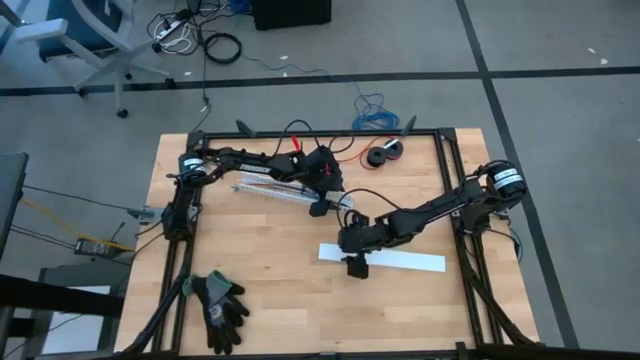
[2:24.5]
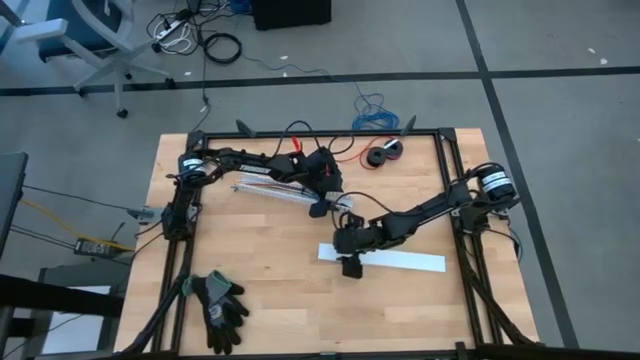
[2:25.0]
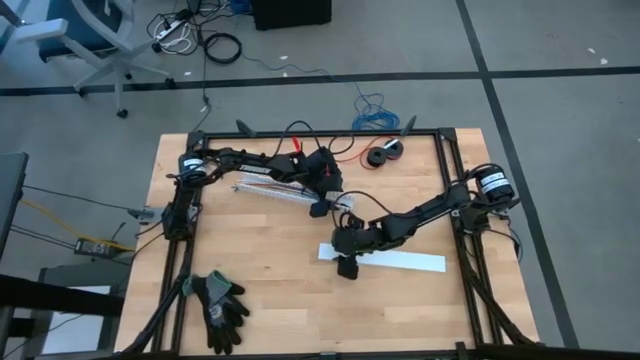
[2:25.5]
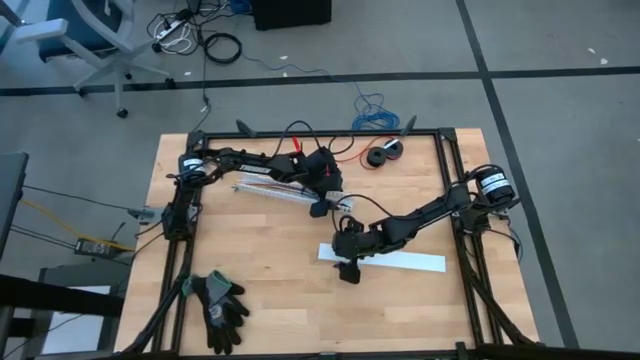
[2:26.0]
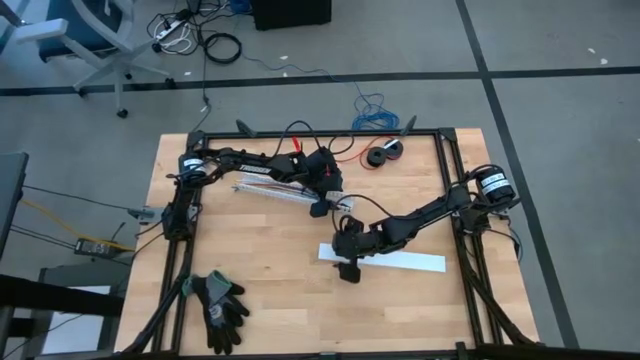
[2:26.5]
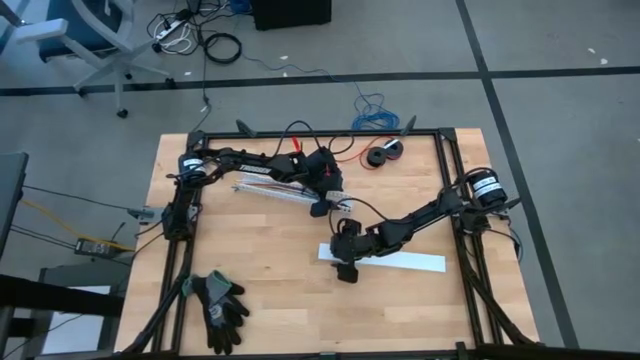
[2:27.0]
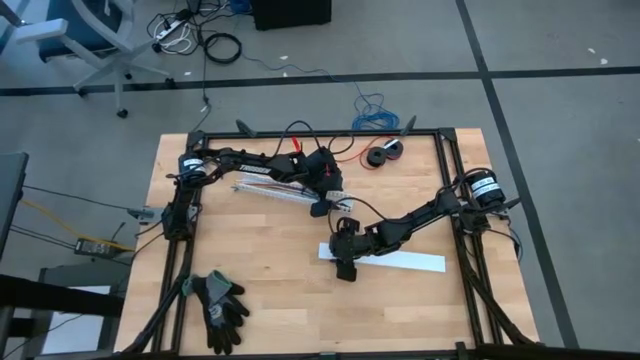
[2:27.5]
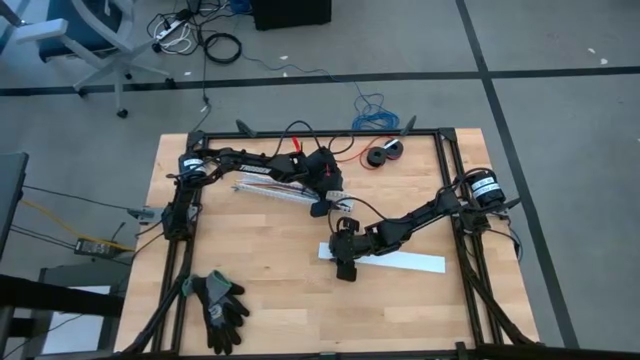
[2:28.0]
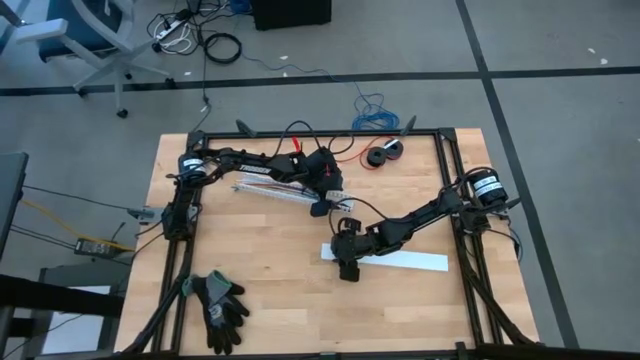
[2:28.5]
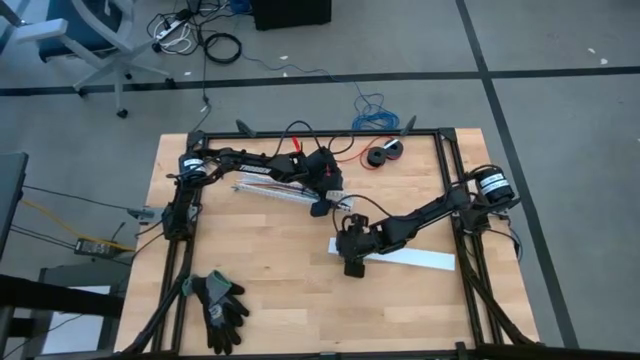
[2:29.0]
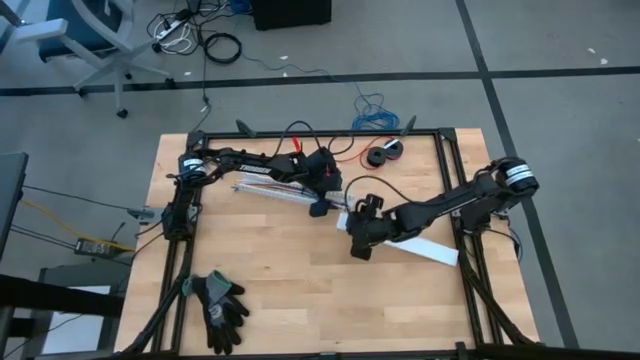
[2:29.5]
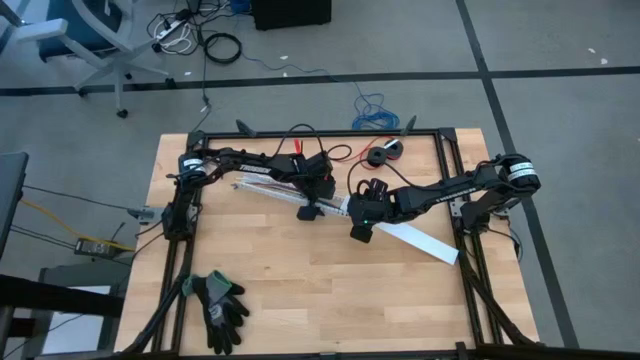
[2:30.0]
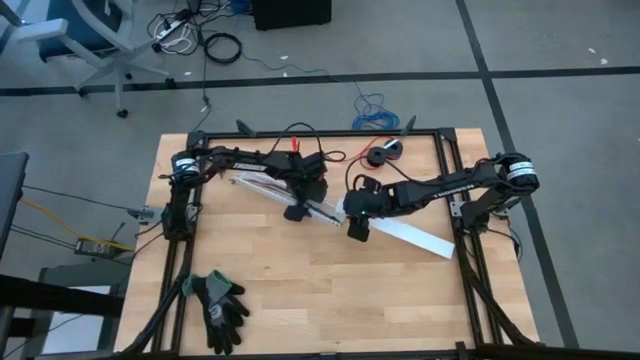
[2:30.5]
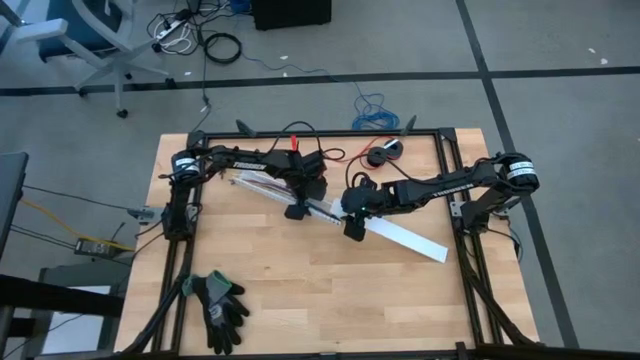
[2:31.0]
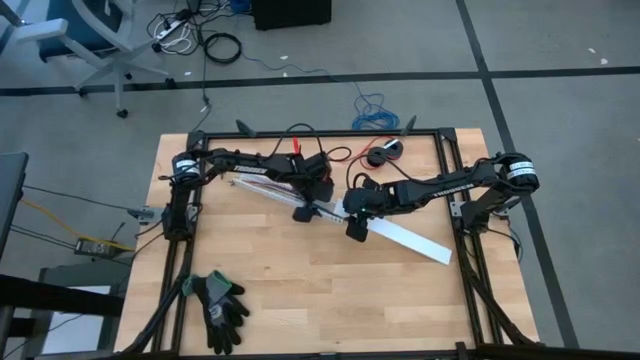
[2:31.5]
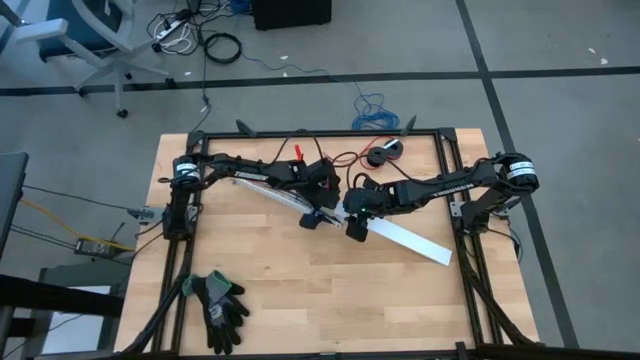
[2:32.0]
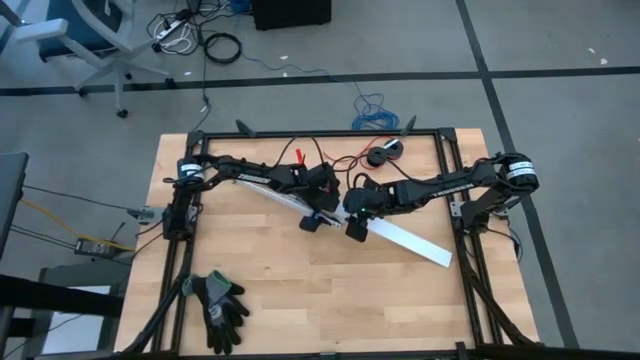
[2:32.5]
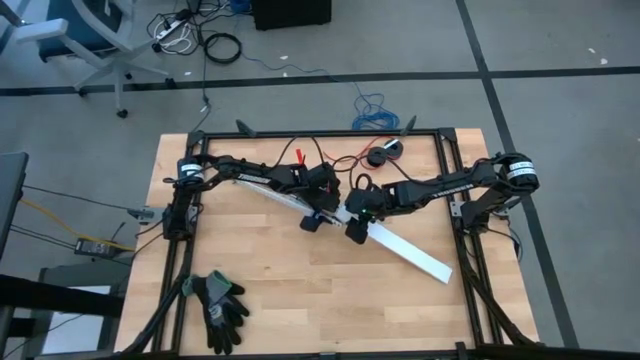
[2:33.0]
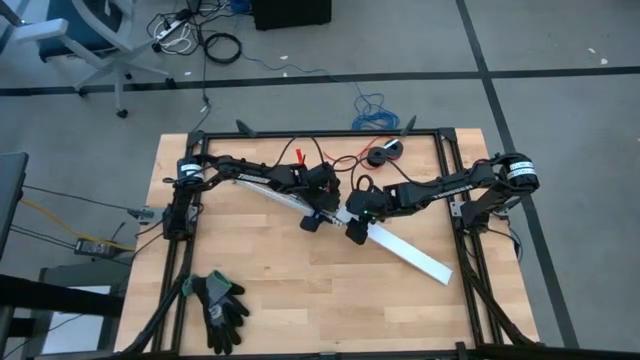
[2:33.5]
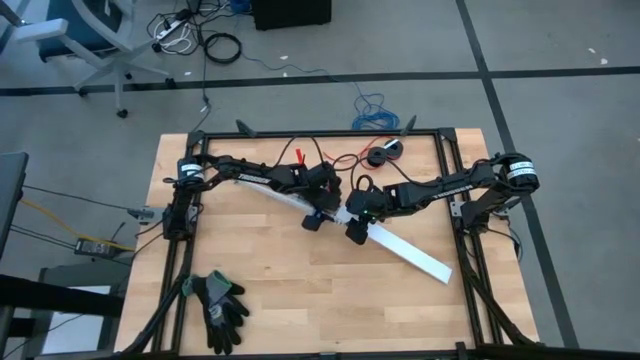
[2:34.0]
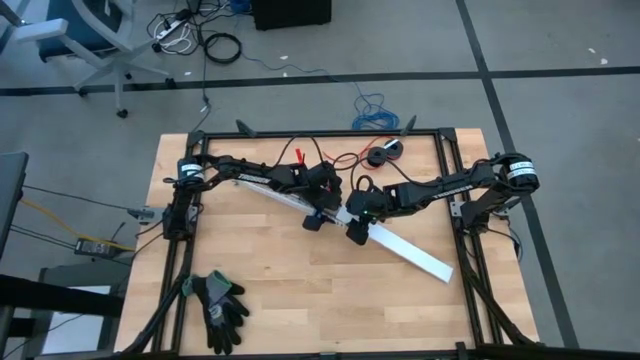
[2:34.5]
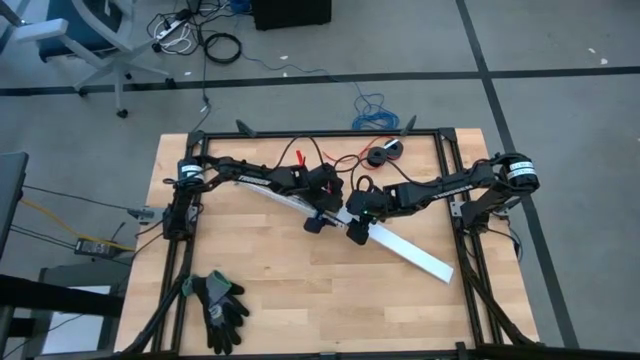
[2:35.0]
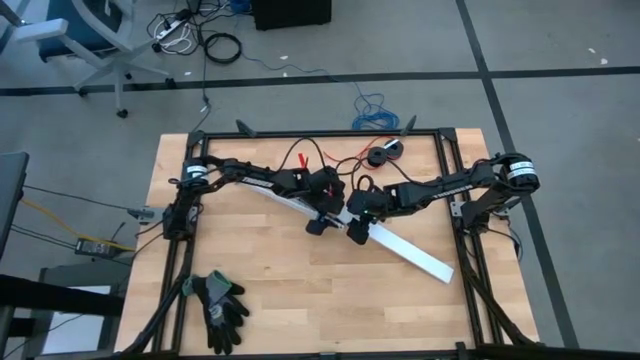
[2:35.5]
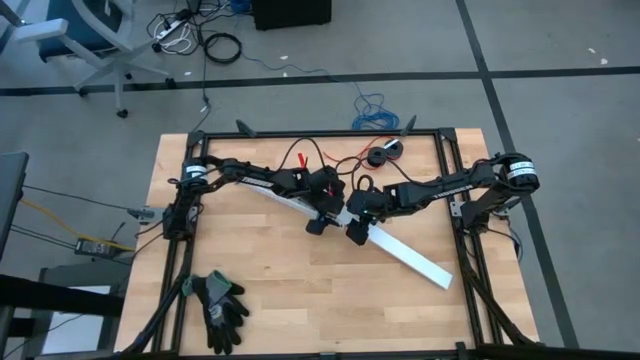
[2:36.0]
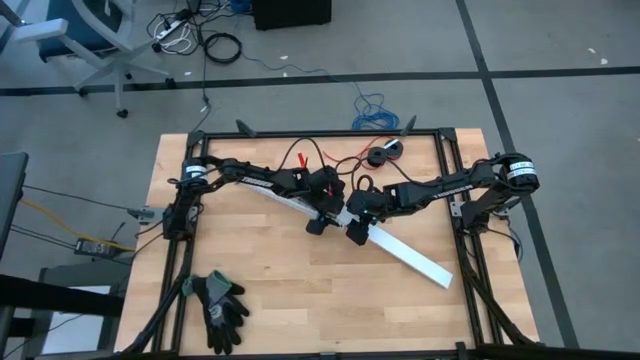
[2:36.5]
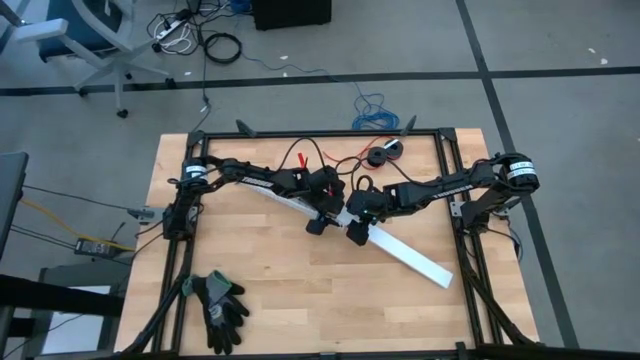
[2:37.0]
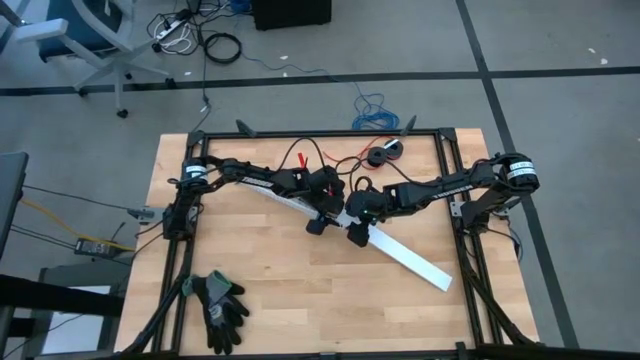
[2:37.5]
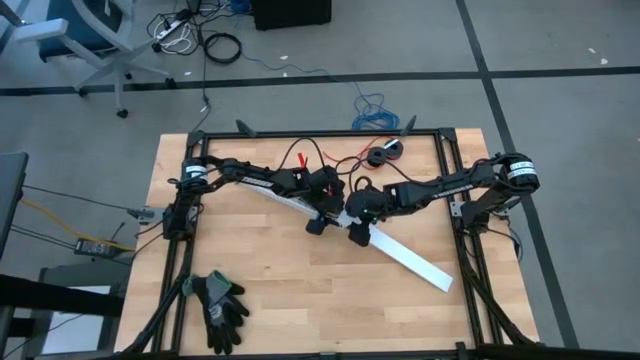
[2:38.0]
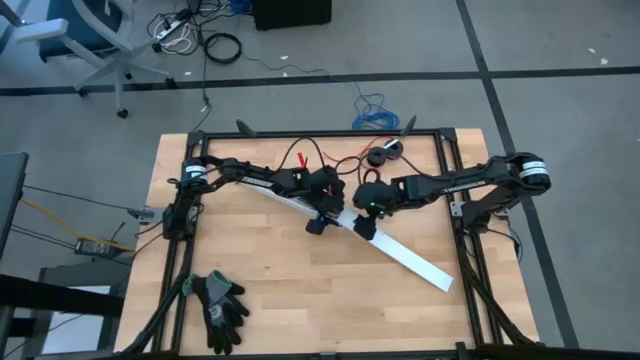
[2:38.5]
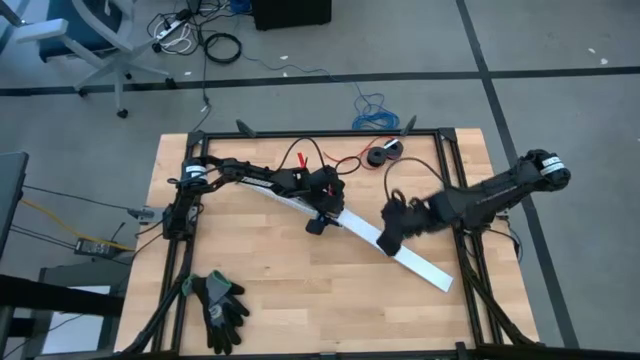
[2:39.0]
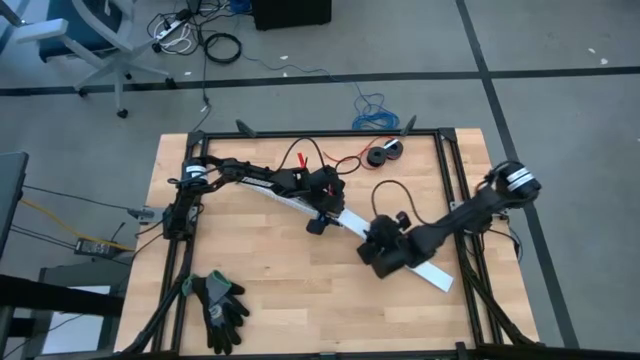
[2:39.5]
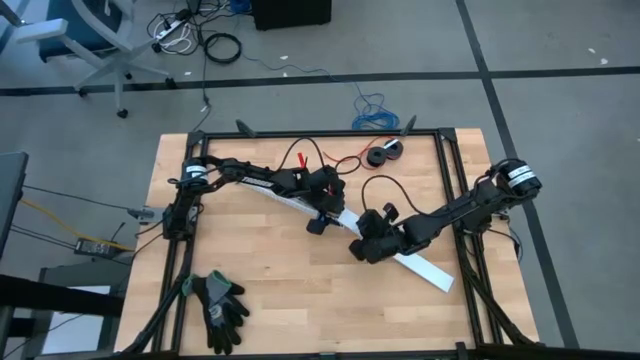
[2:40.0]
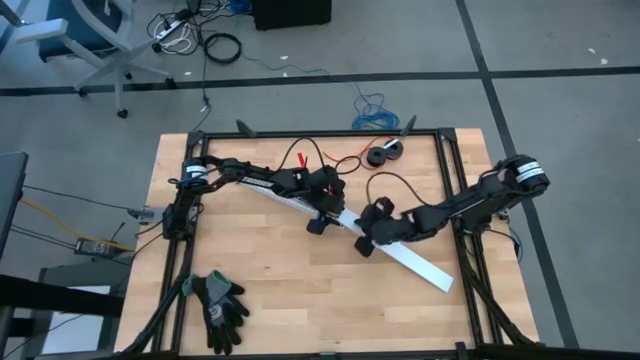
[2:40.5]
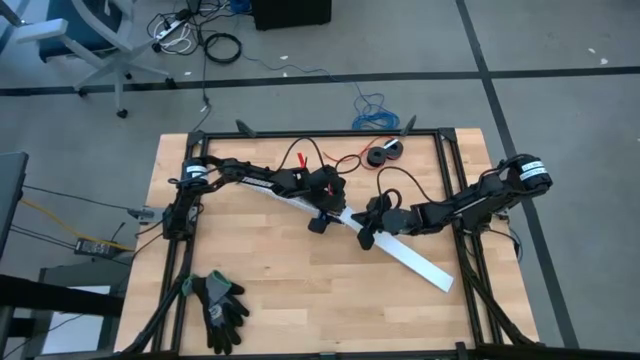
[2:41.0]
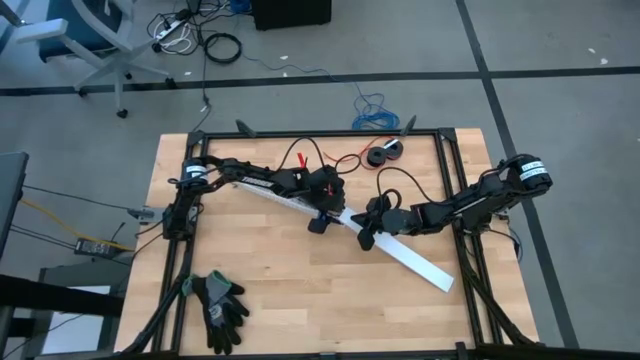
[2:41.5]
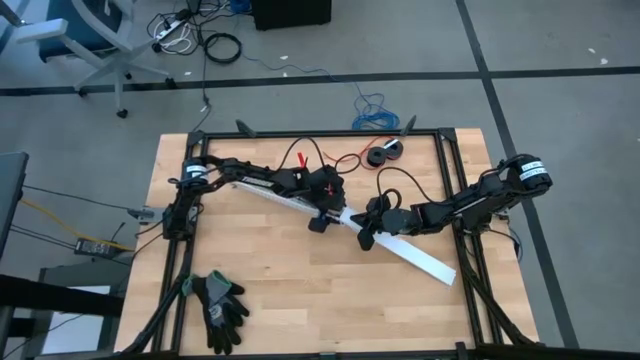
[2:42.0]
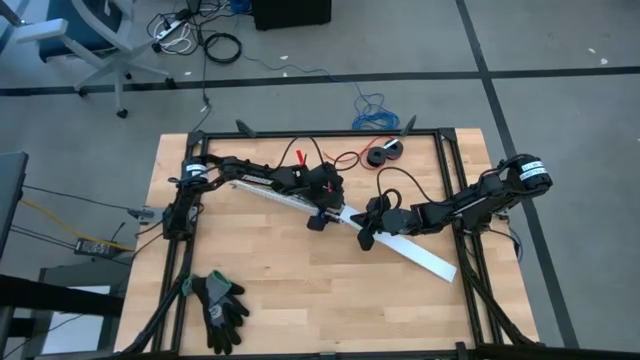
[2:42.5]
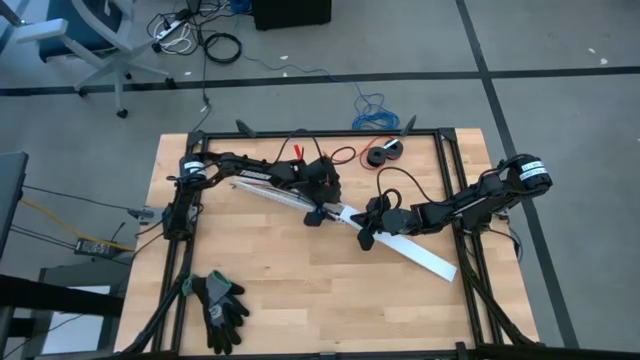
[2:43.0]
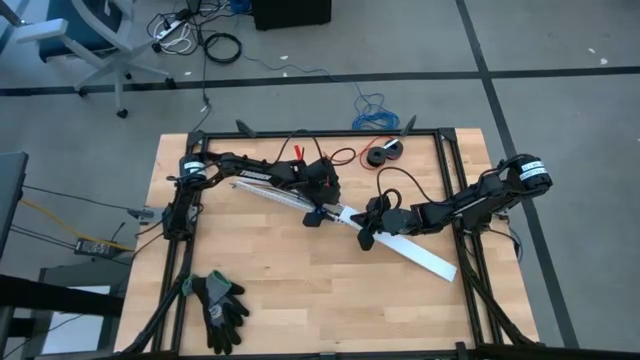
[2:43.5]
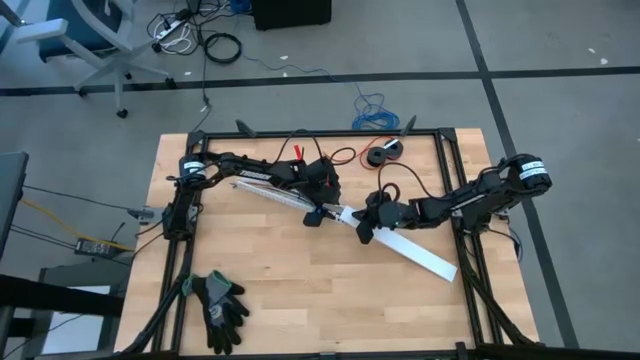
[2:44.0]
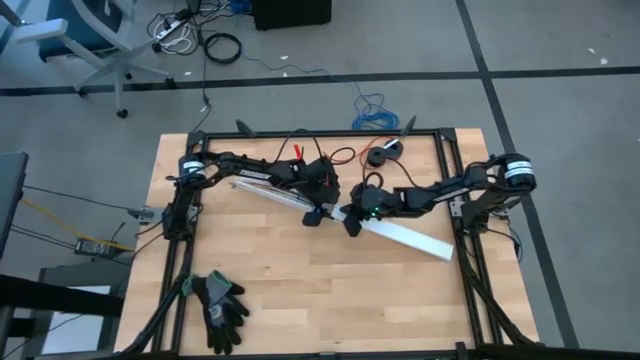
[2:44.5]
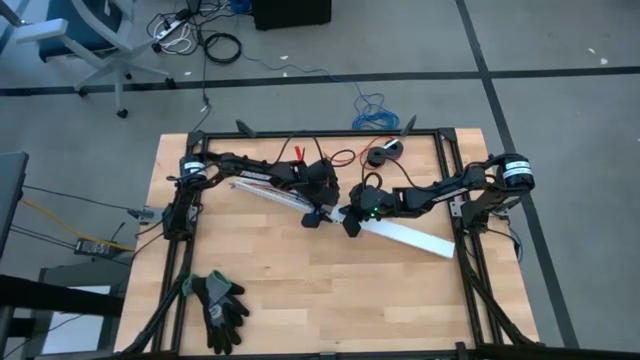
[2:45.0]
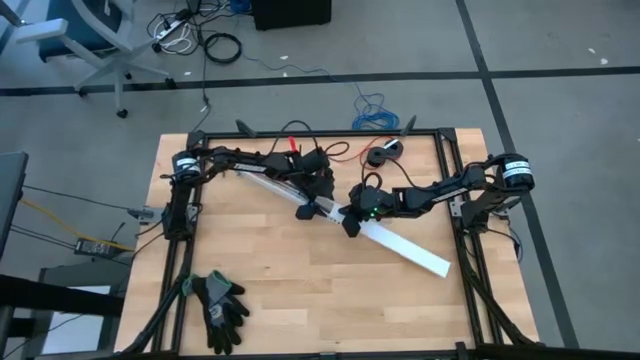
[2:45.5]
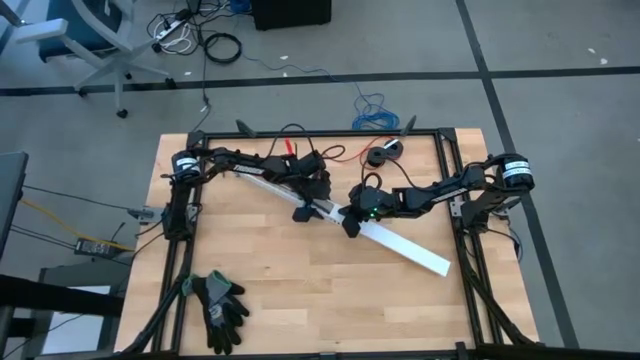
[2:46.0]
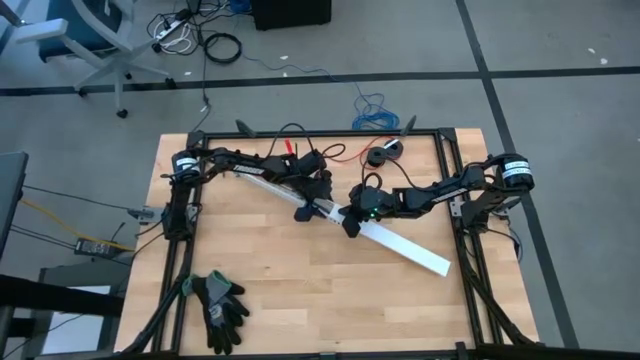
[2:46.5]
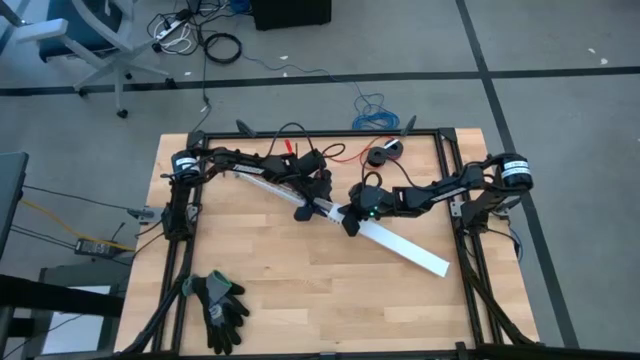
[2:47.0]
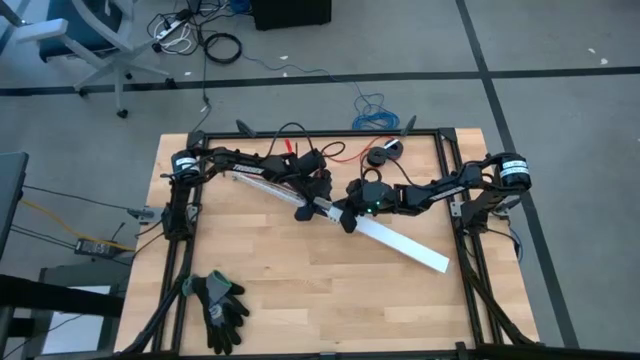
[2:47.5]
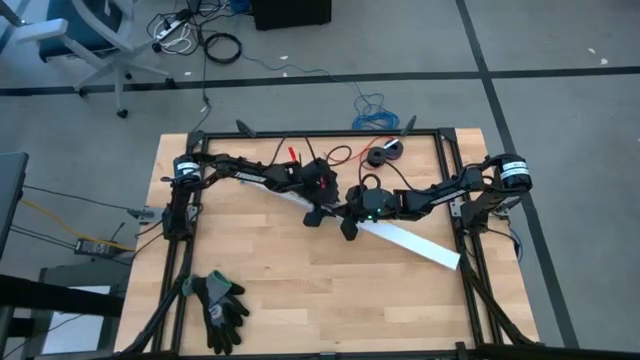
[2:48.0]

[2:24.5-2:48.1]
Task: Ziptie cables
Close the white cable duct cover
